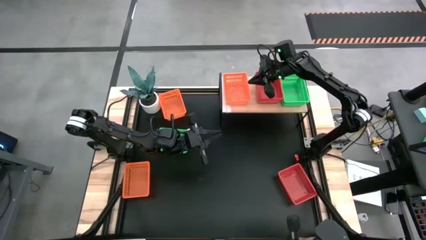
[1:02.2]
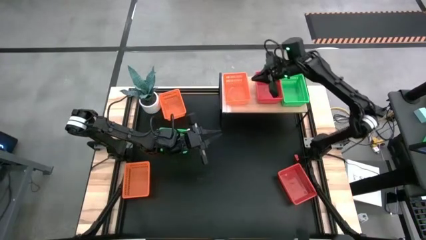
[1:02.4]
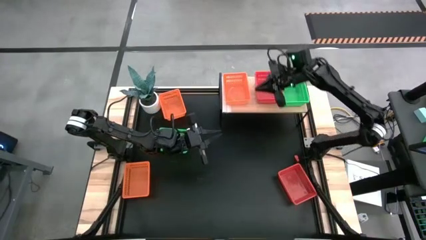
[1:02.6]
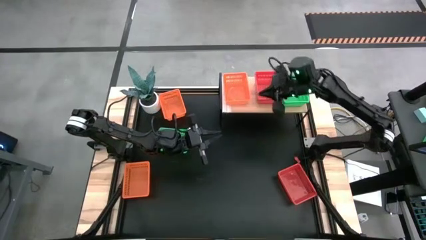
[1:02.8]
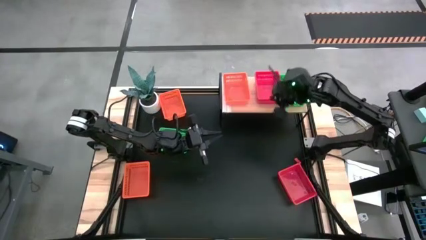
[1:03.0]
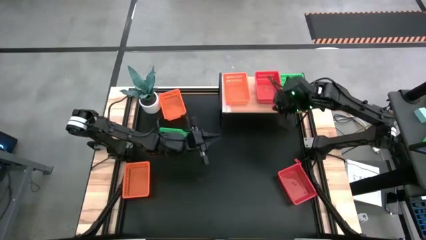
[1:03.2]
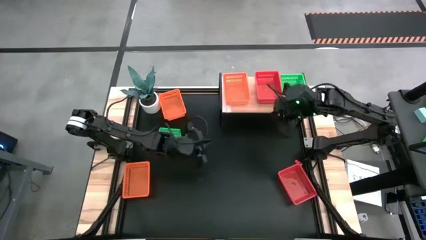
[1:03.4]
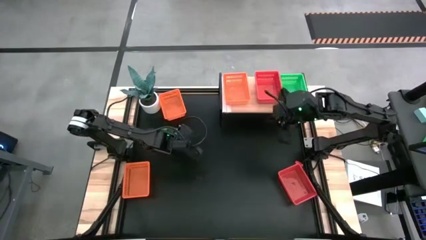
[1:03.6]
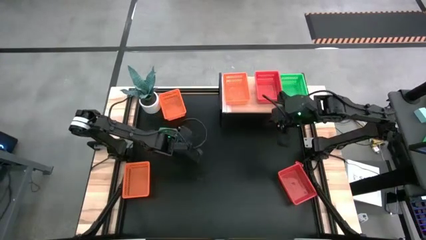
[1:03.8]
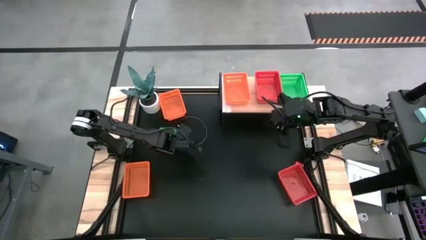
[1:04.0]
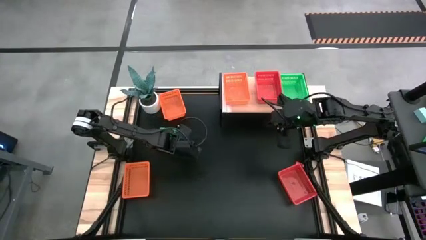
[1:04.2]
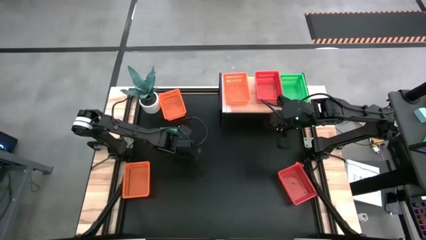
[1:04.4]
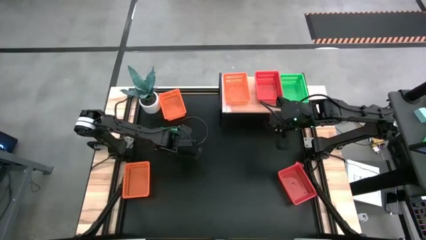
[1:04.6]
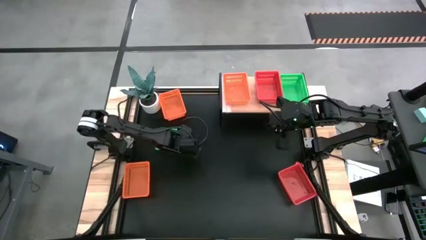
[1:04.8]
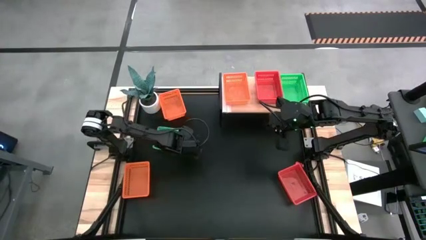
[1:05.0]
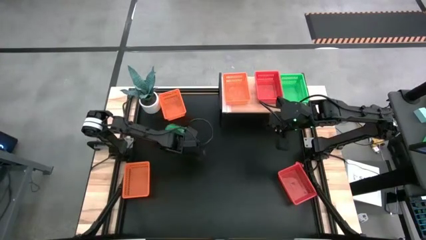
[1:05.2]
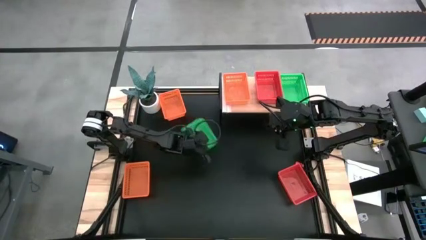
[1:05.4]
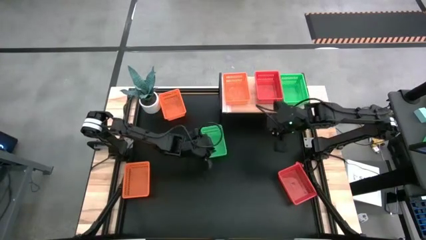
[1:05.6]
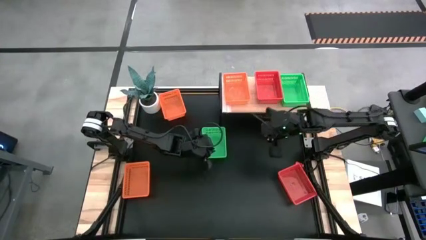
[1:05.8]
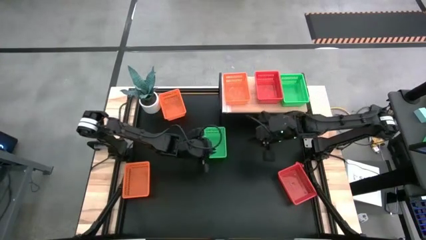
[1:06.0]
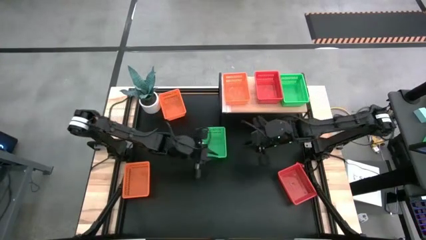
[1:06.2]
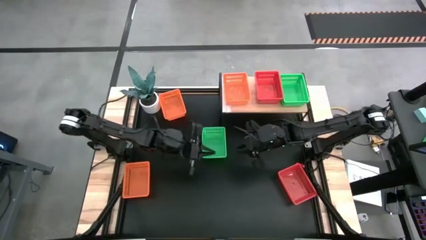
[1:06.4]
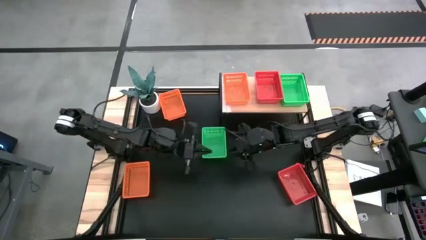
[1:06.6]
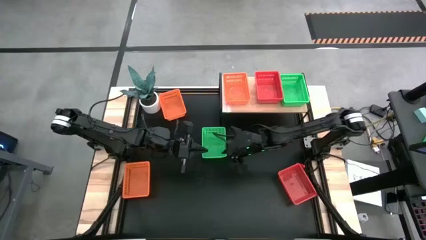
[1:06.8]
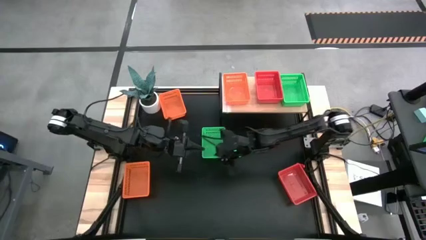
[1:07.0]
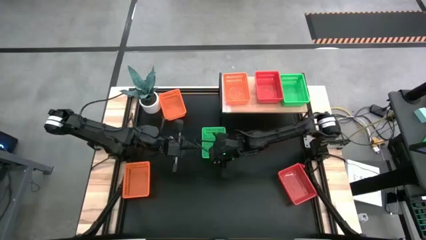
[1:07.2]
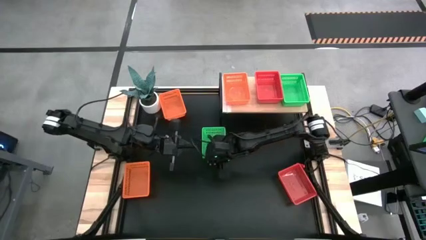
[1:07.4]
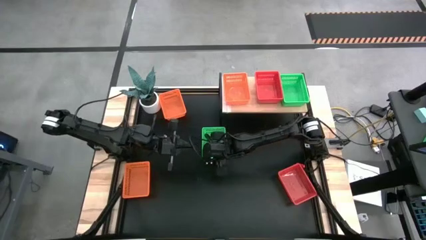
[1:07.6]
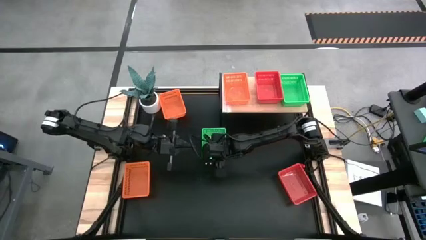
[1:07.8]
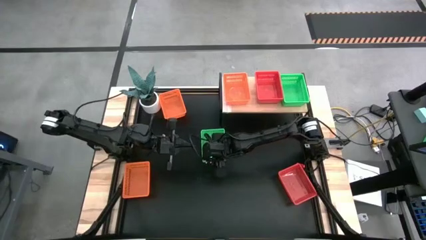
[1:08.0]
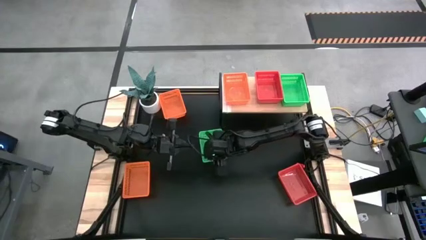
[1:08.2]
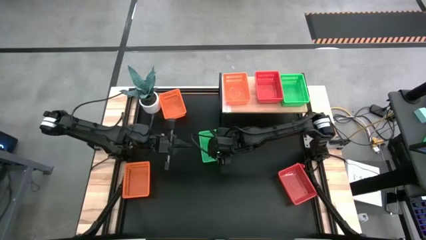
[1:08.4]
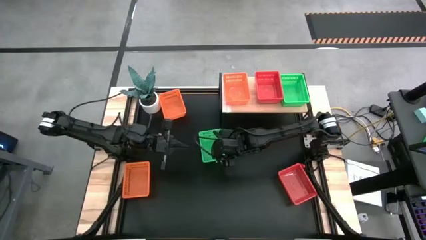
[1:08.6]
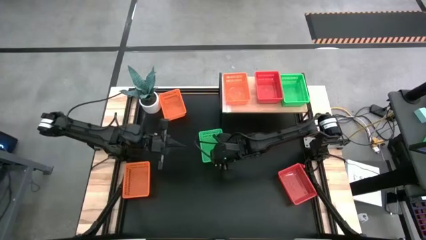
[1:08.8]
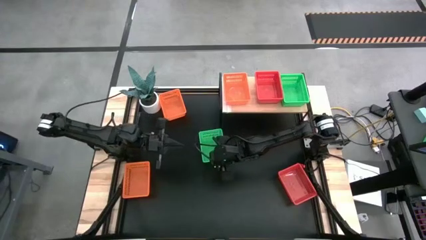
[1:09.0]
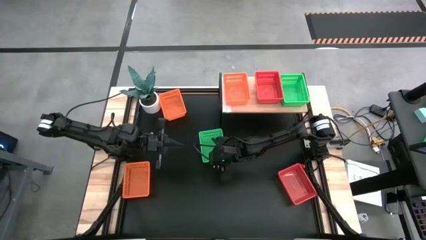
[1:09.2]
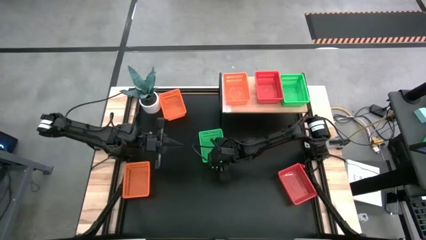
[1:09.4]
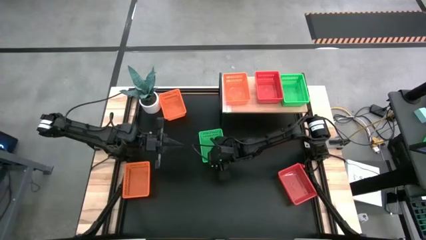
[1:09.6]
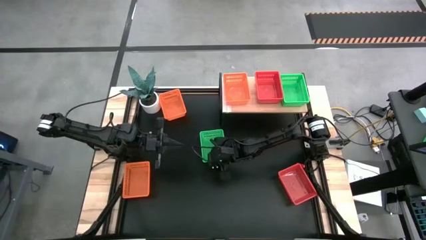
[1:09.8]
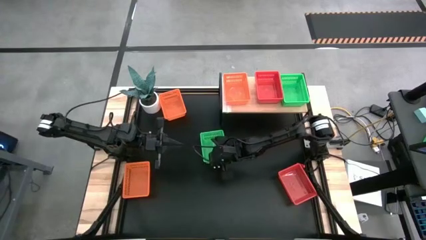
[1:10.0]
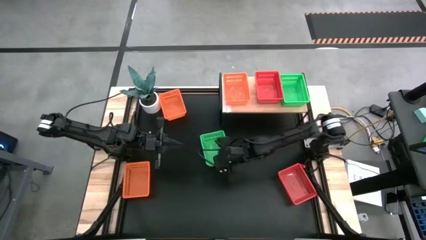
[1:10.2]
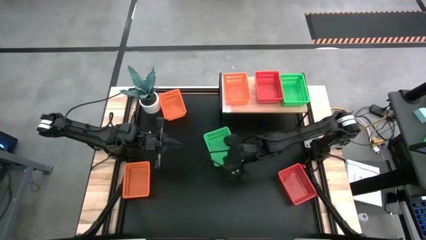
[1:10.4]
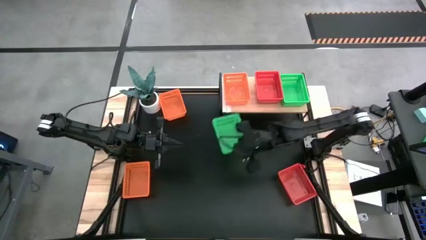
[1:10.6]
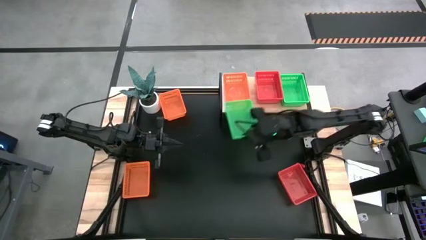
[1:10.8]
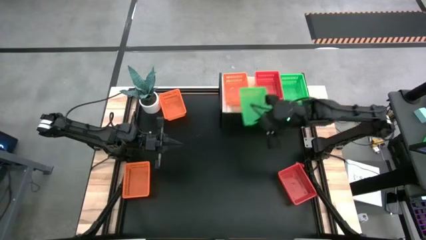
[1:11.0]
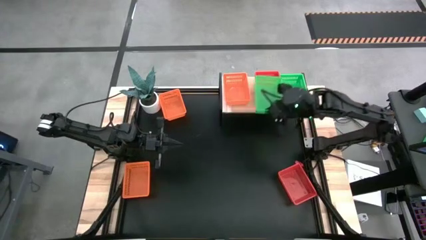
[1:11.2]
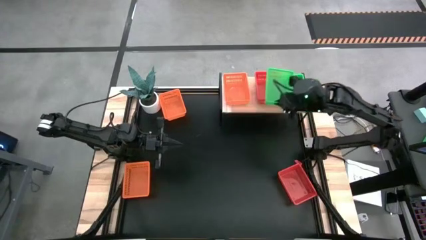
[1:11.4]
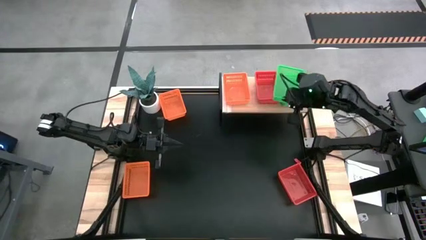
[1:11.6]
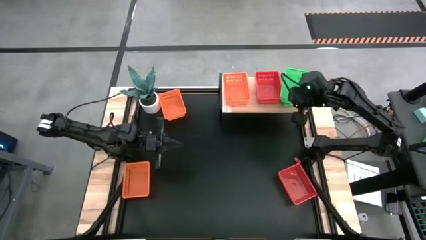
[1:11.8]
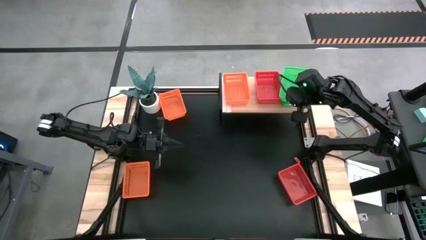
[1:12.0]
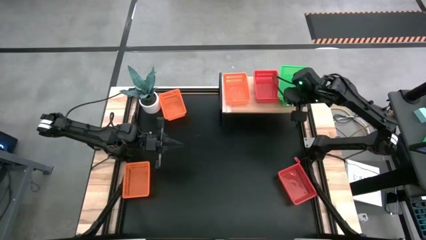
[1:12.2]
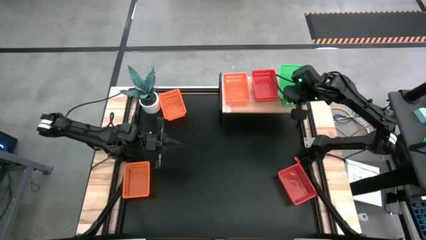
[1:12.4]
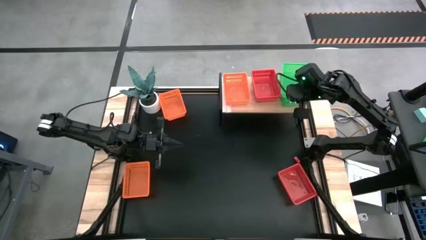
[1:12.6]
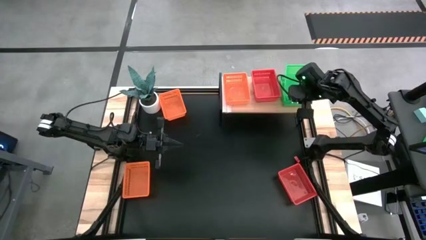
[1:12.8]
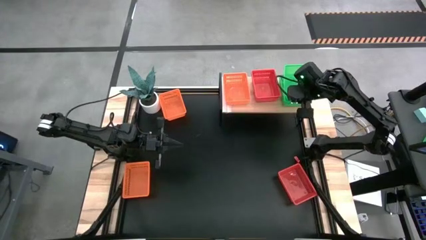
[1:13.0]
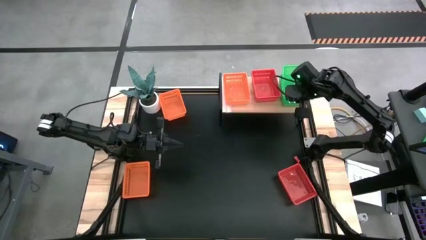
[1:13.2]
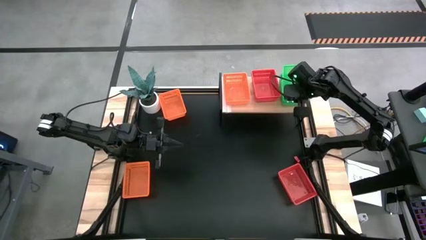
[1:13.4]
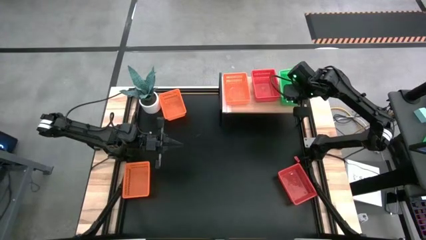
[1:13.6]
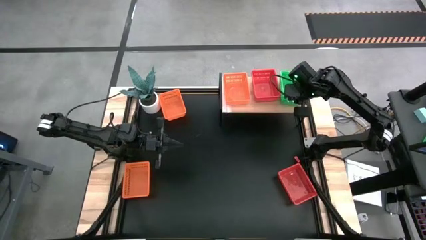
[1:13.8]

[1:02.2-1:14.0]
Task: Stack baskets on shelf by color
Stack the green bin on the other green bins on the shelf
